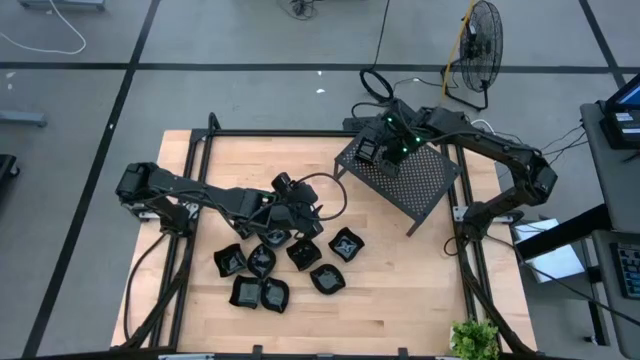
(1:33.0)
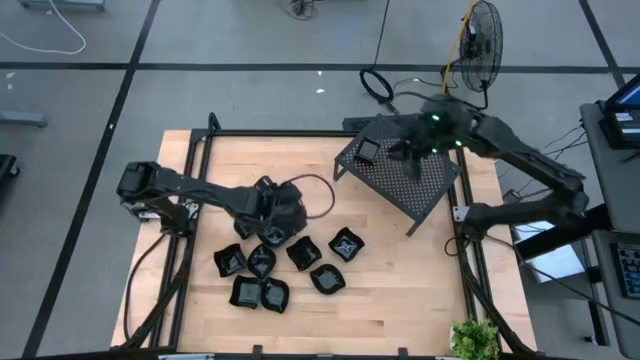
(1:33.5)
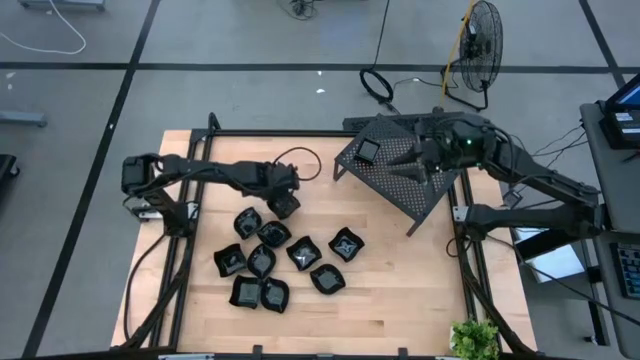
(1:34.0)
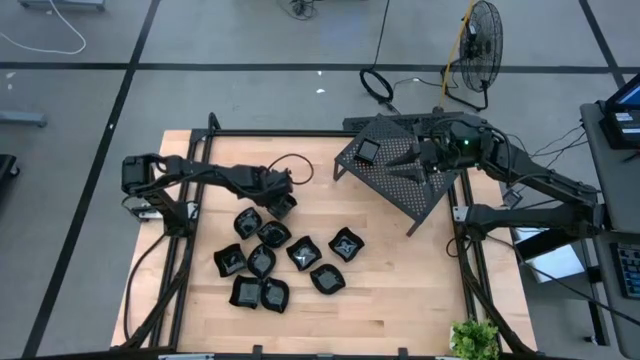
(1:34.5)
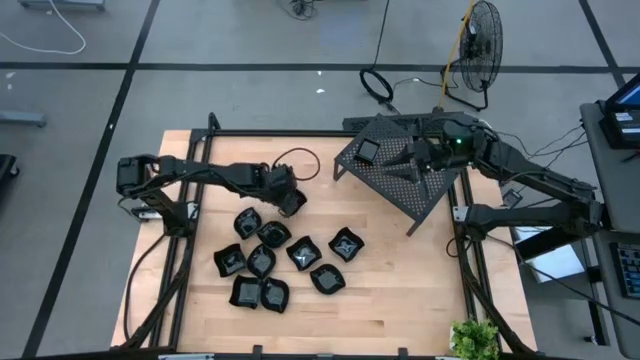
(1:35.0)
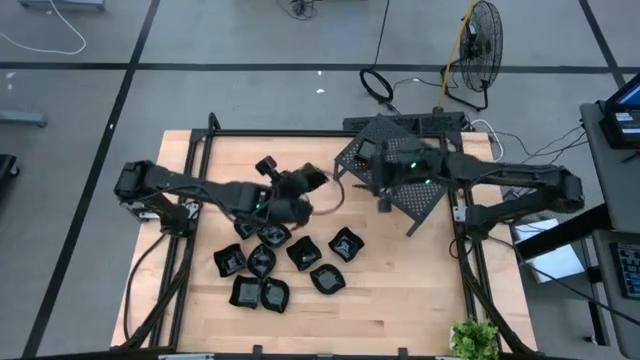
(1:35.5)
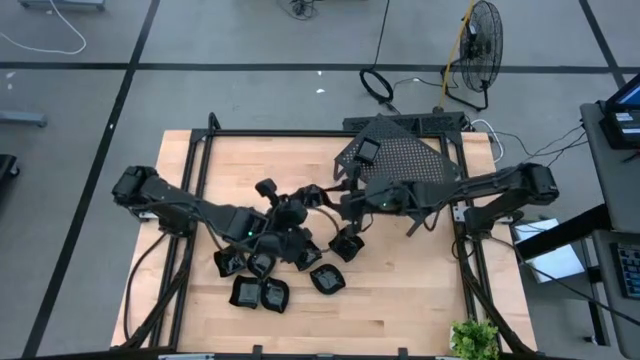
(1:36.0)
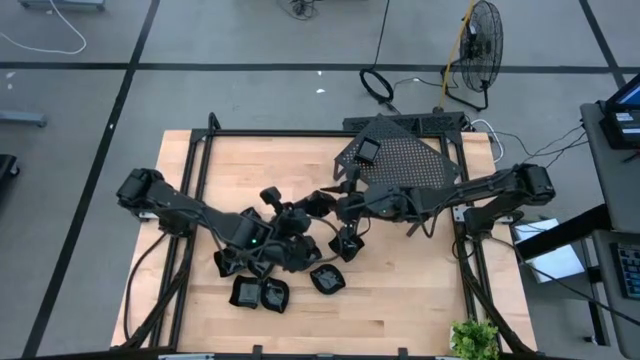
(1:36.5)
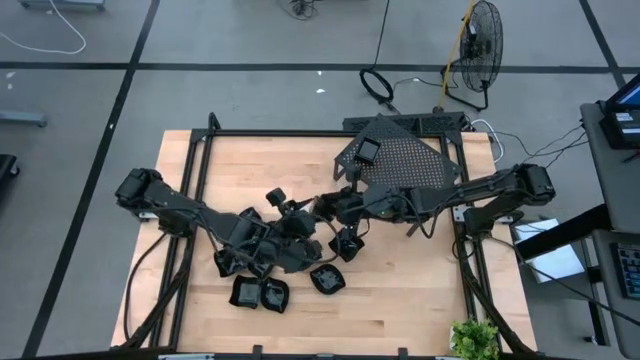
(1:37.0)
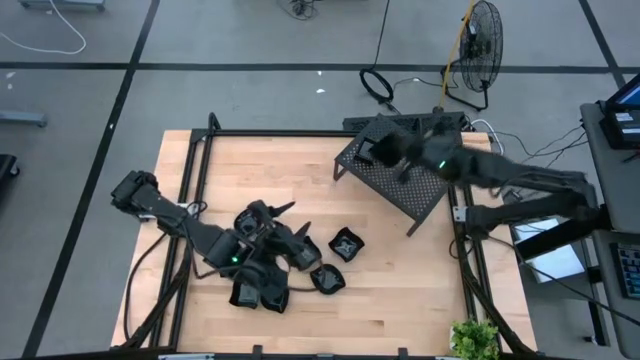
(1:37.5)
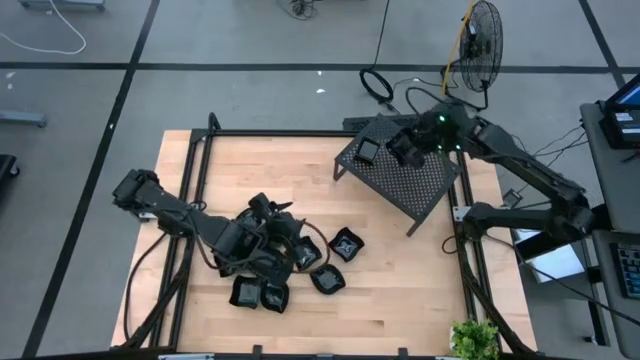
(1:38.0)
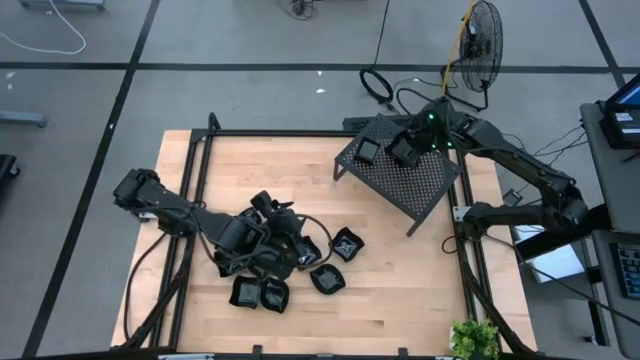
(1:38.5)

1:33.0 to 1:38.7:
Task: Pick & Place Mini shaped plates
Put the black distorted square plate on the shelf

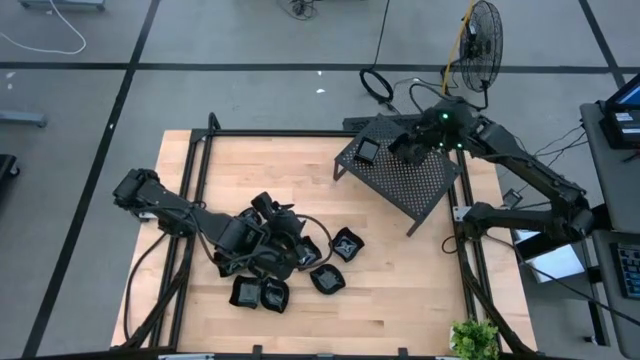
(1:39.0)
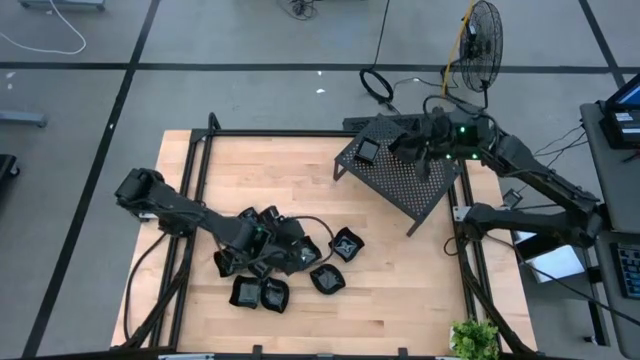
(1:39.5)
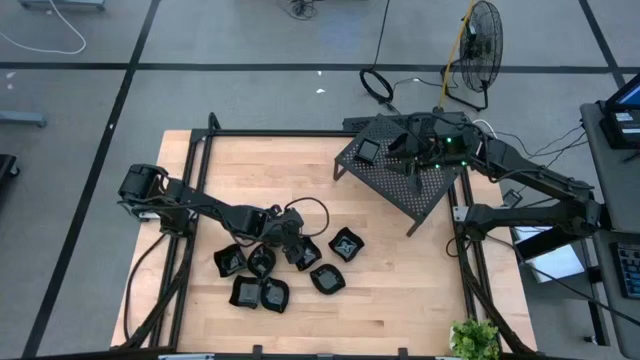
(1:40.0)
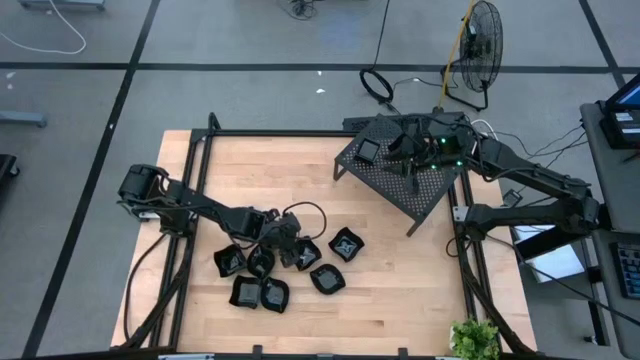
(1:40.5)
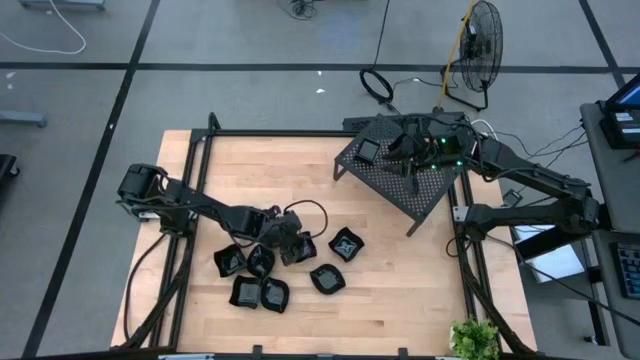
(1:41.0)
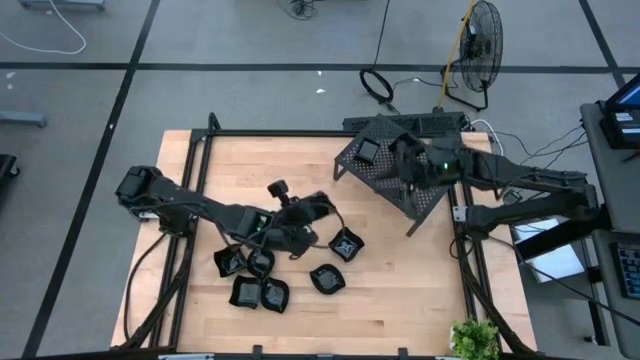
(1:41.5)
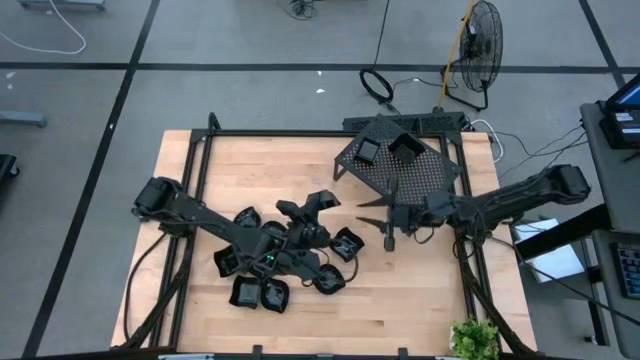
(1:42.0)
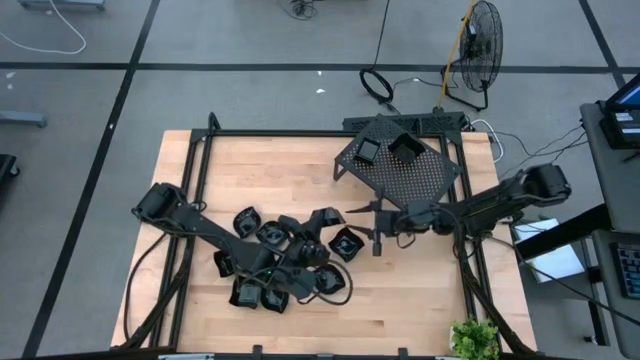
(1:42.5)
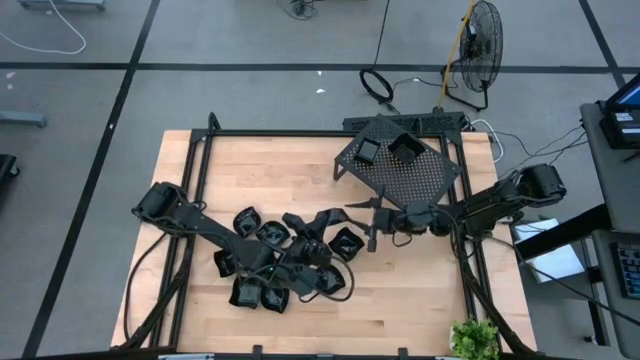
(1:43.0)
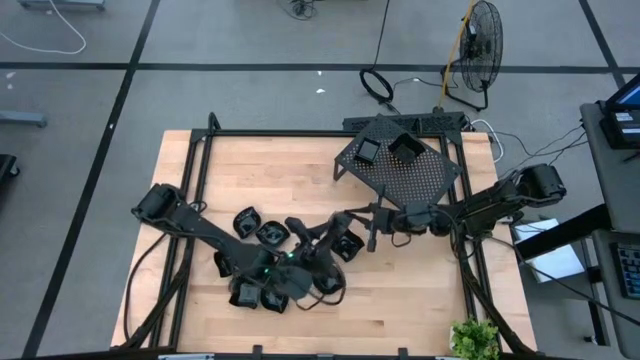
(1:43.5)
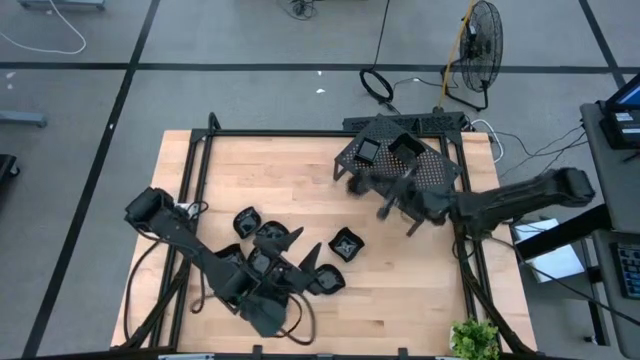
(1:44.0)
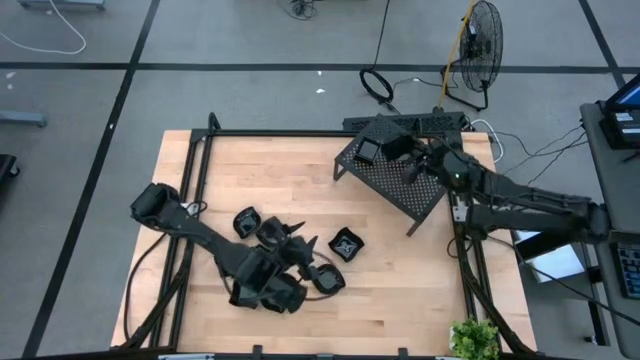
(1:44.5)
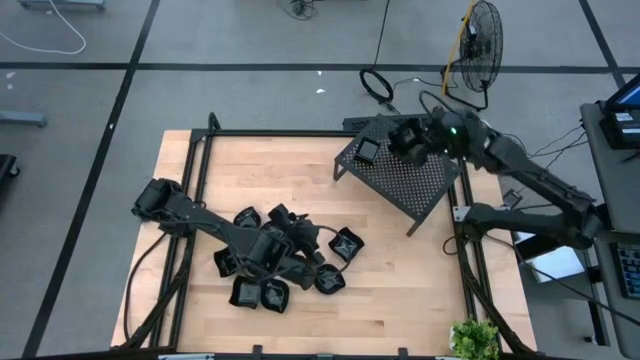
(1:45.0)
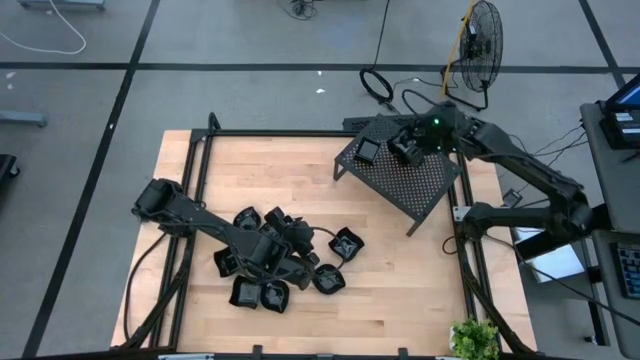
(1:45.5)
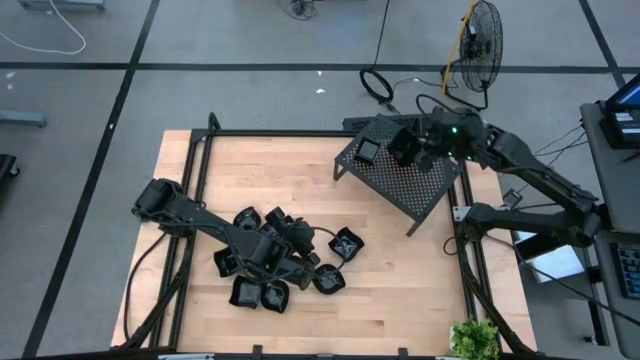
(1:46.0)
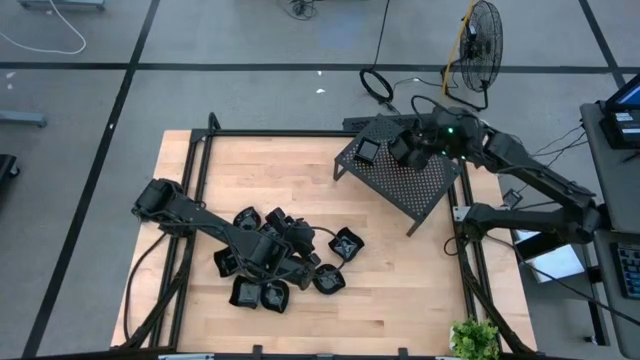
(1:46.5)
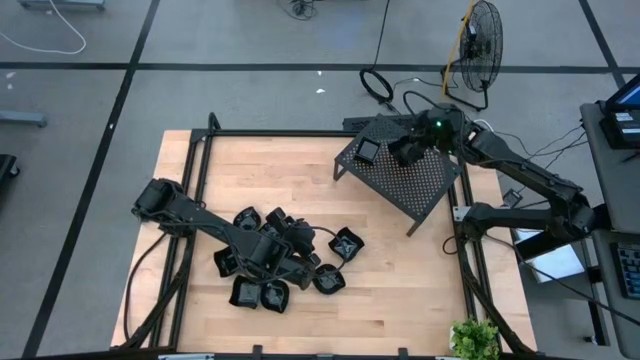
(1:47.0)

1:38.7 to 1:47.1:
Stack the black distorted square plate on the black distorted square plate on the shelf

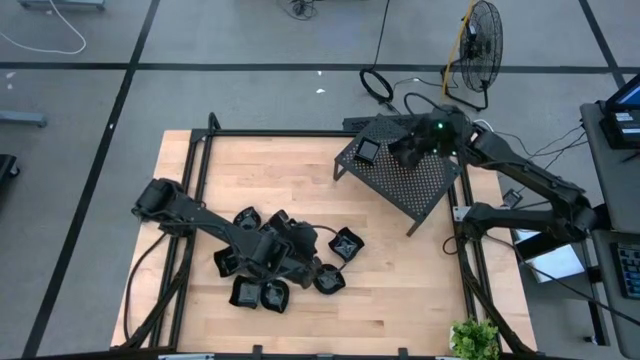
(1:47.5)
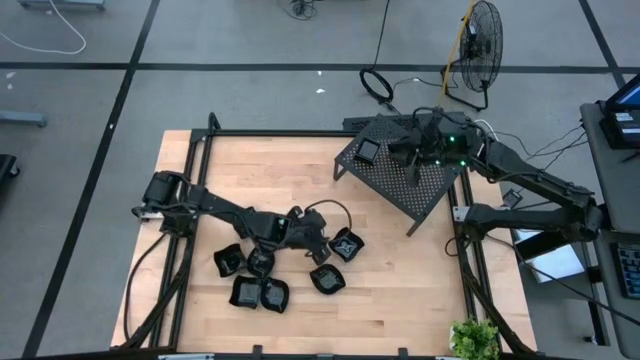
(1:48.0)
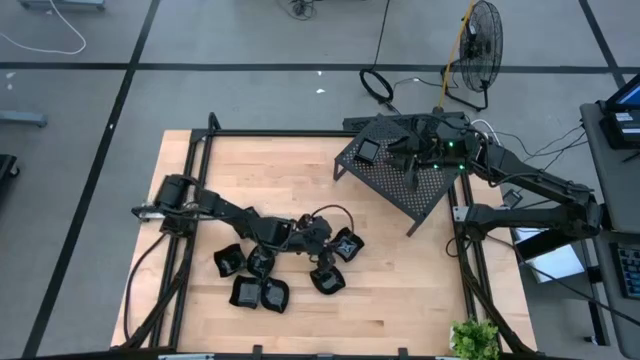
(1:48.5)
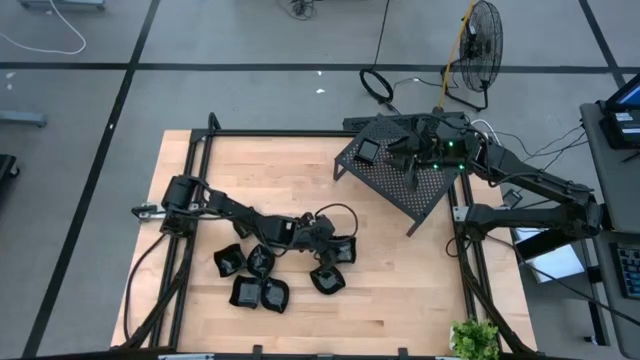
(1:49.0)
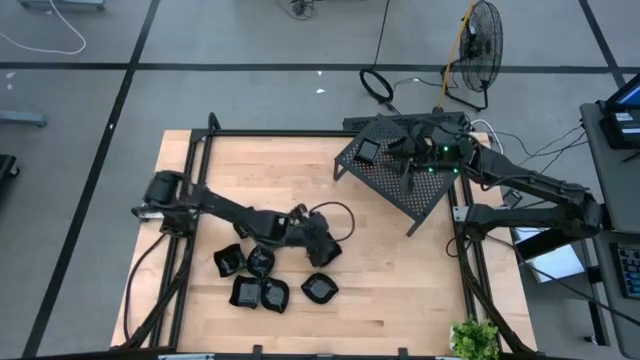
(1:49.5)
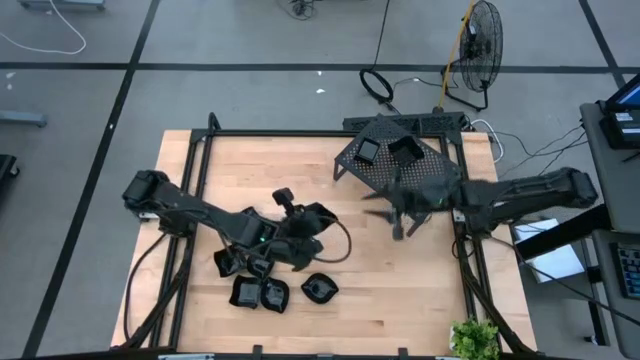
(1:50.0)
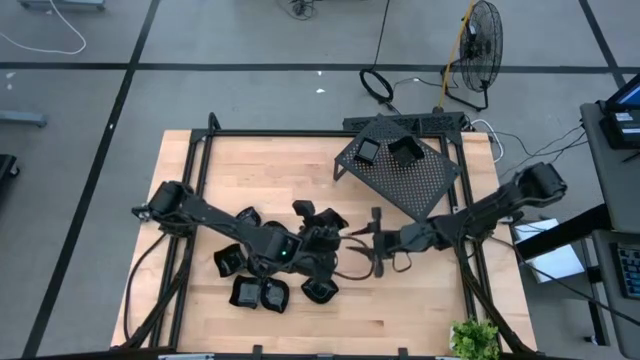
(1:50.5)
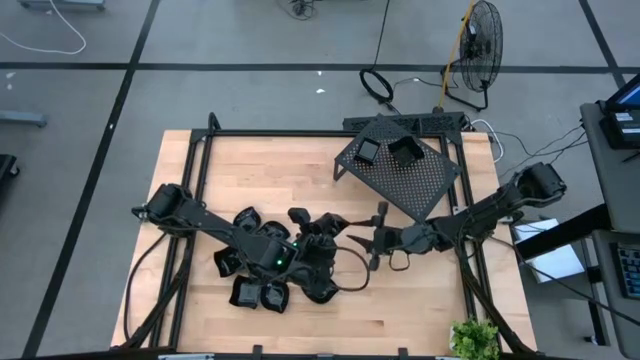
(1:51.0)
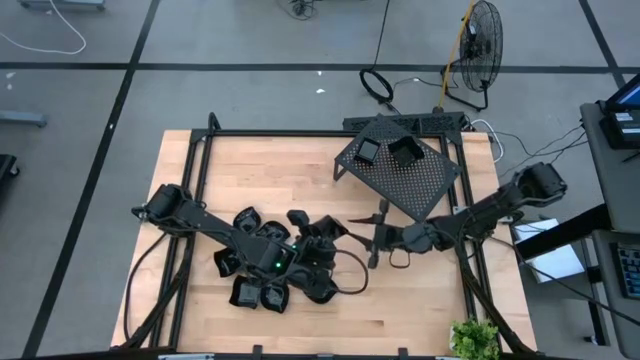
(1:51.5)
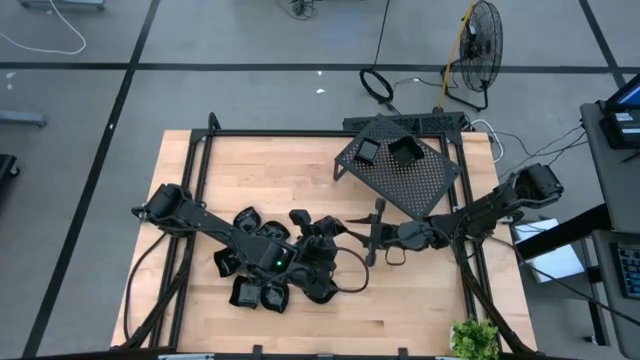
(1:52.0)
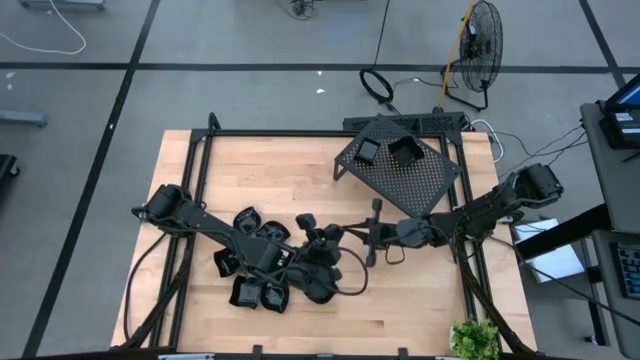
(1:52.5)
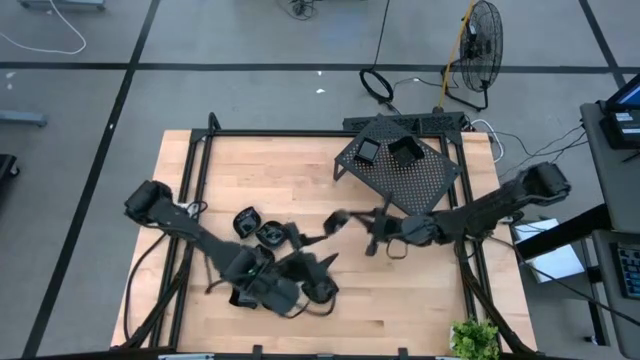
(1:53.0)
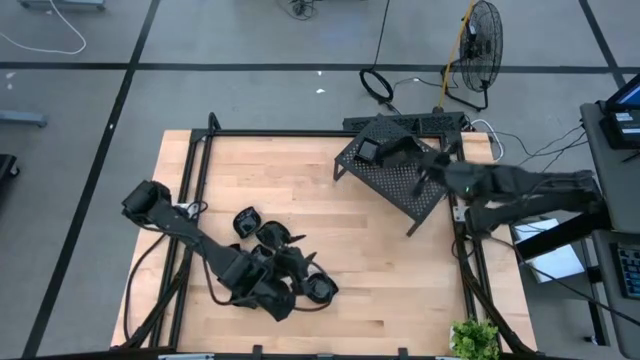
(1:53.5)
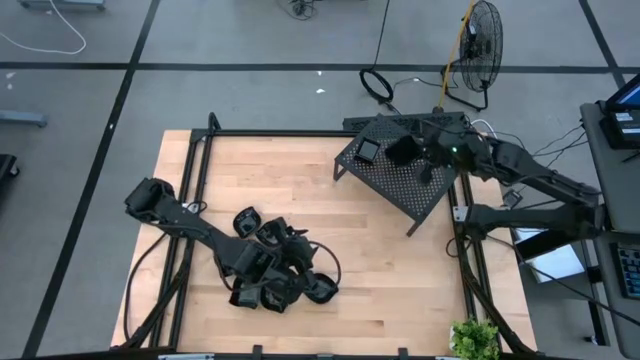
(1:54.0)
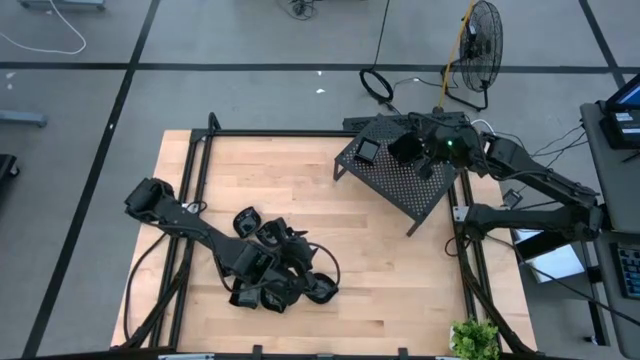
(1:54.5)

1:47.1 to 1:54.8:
Stack the black distorted square plate on the black distorted square plate on the shelf
